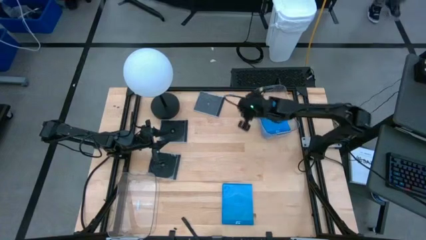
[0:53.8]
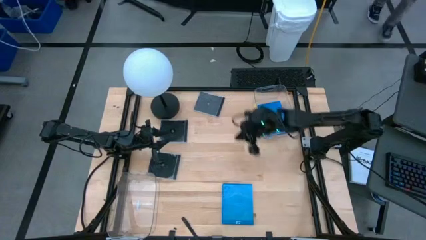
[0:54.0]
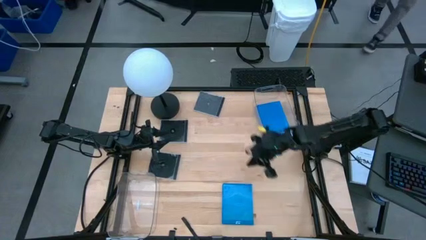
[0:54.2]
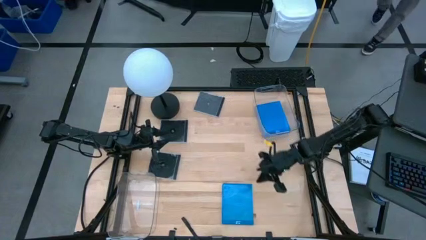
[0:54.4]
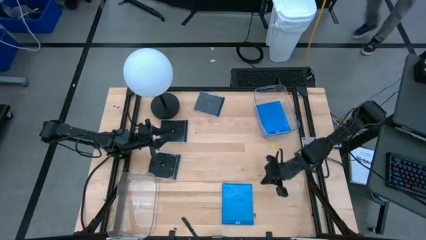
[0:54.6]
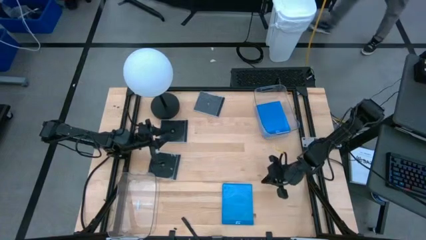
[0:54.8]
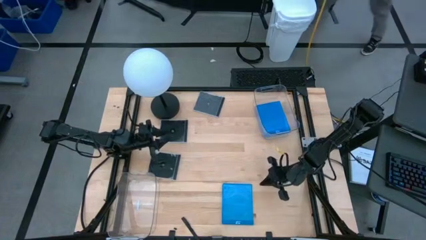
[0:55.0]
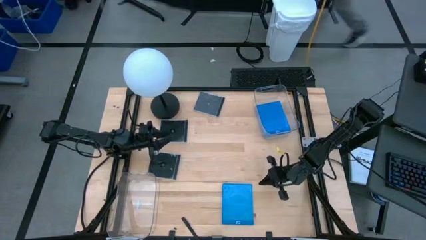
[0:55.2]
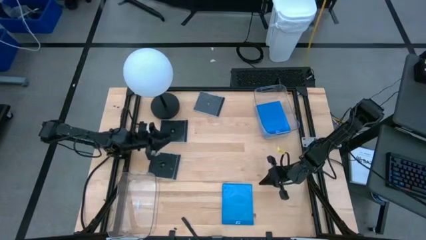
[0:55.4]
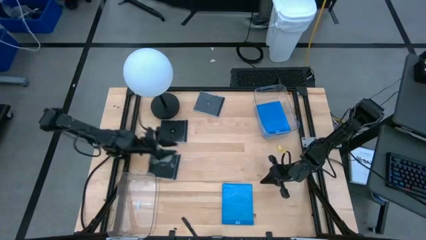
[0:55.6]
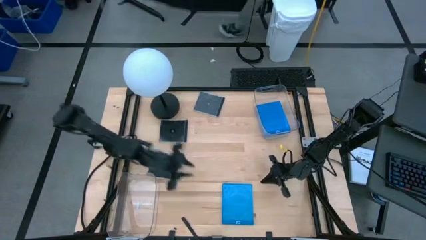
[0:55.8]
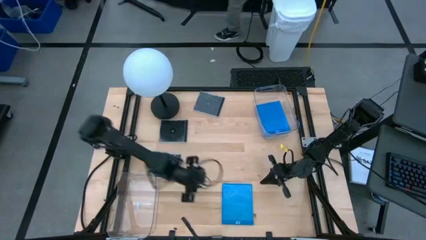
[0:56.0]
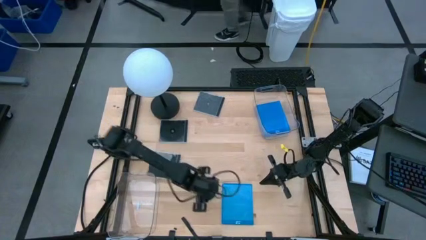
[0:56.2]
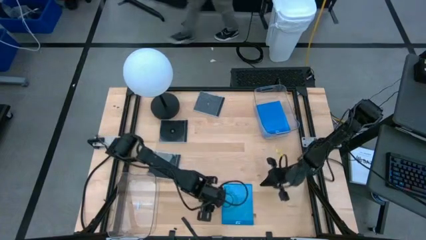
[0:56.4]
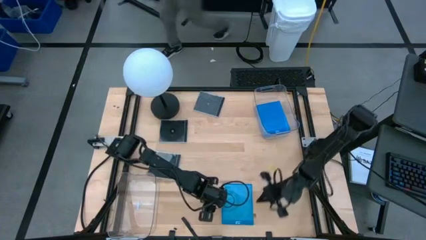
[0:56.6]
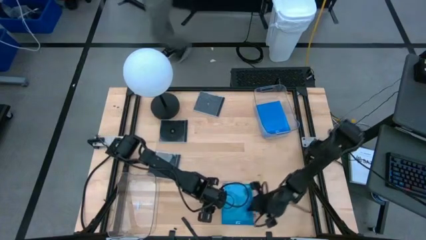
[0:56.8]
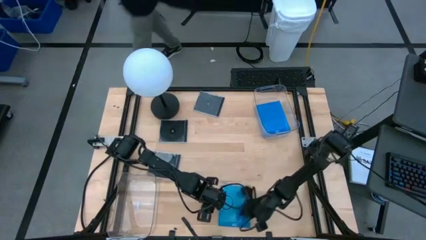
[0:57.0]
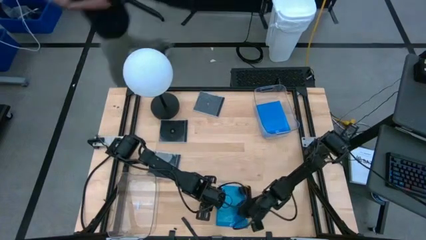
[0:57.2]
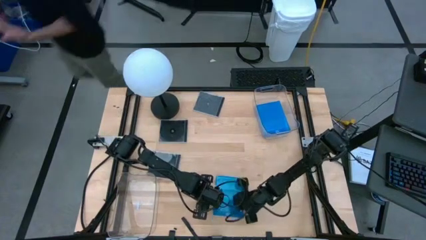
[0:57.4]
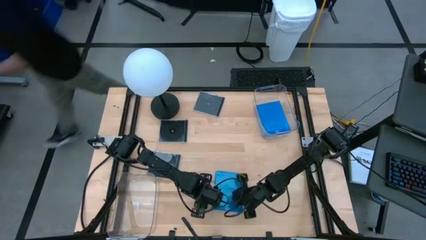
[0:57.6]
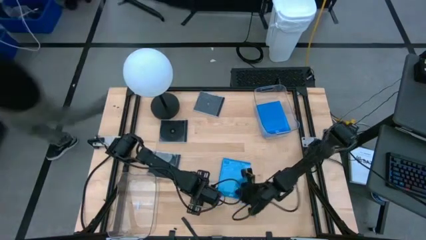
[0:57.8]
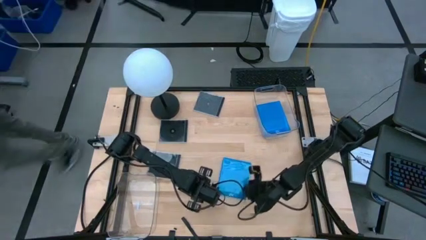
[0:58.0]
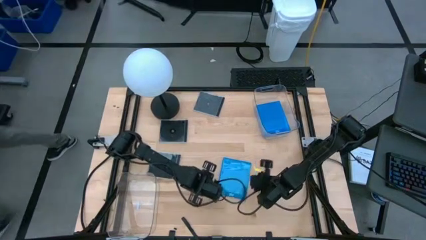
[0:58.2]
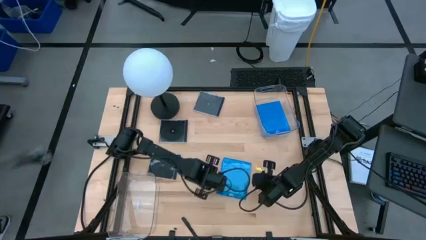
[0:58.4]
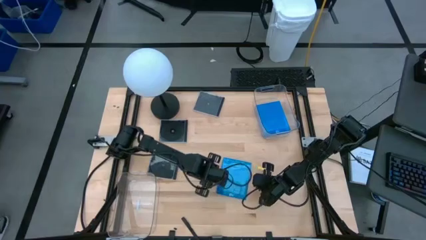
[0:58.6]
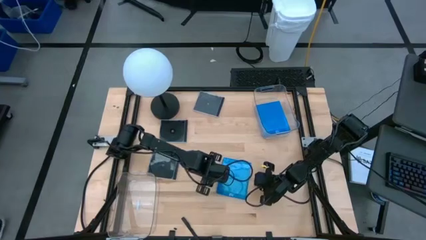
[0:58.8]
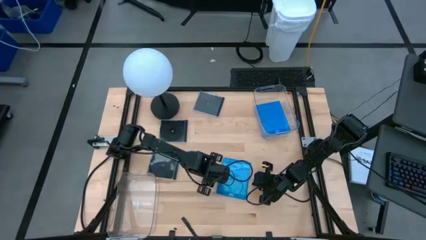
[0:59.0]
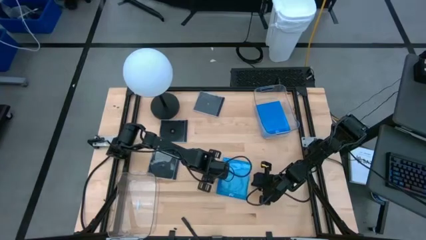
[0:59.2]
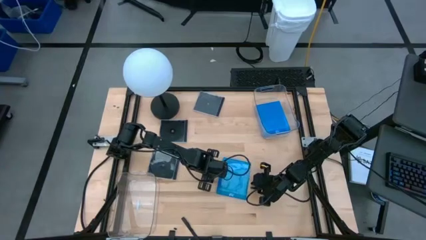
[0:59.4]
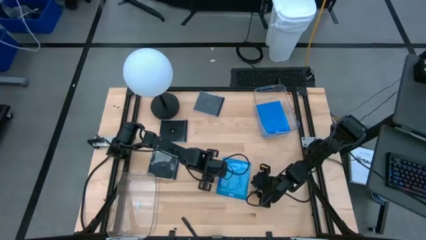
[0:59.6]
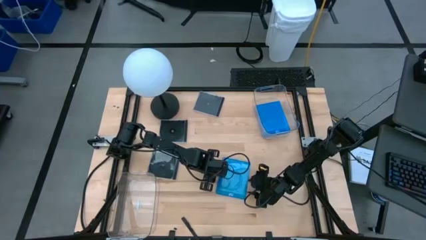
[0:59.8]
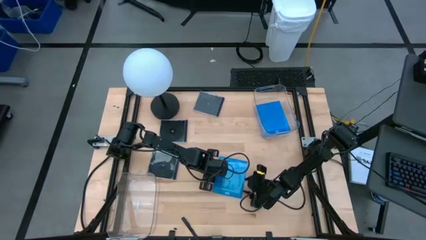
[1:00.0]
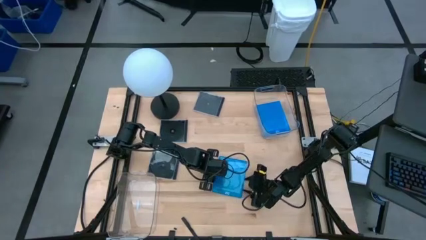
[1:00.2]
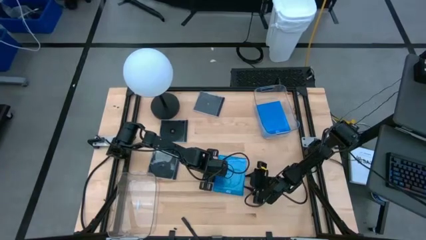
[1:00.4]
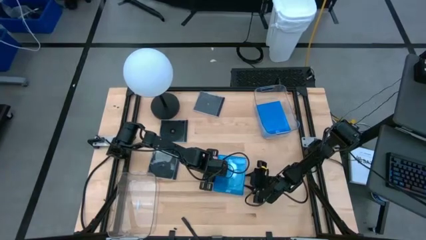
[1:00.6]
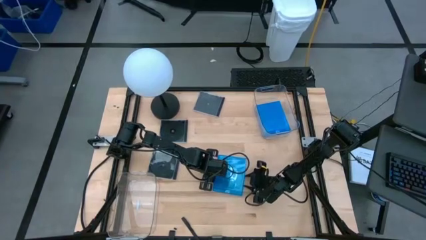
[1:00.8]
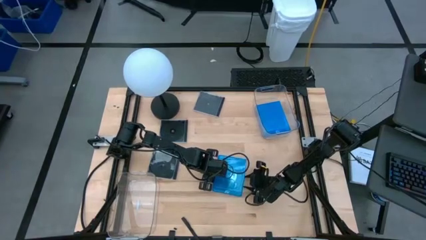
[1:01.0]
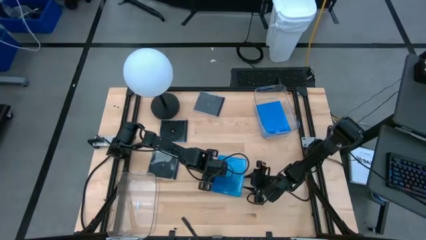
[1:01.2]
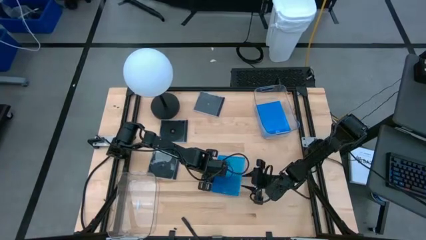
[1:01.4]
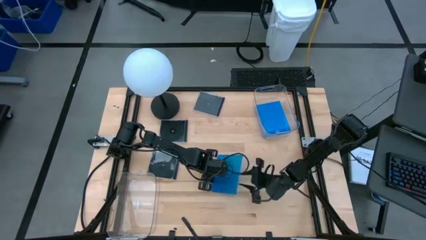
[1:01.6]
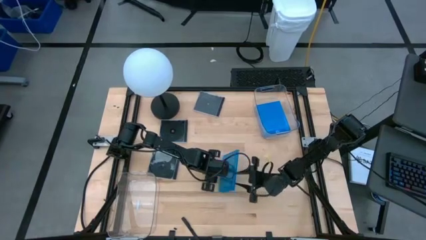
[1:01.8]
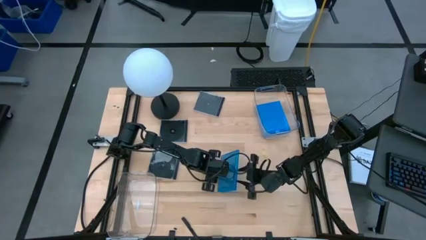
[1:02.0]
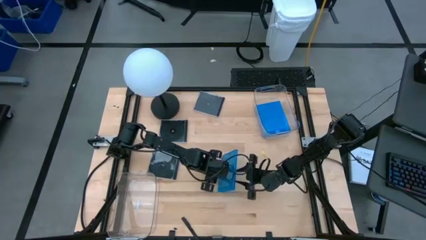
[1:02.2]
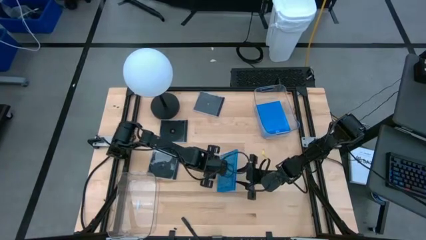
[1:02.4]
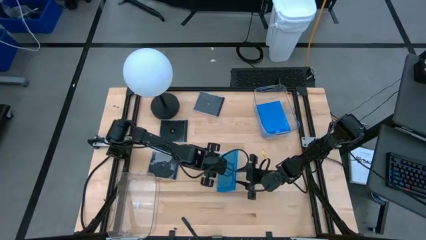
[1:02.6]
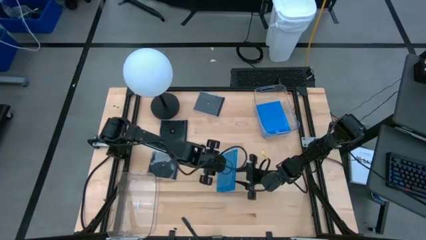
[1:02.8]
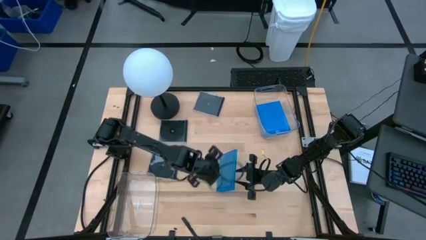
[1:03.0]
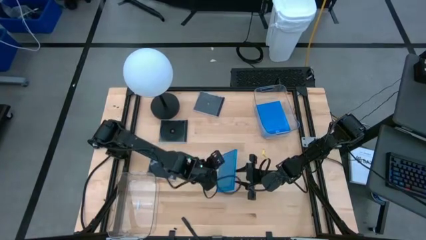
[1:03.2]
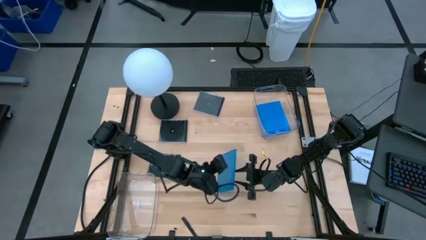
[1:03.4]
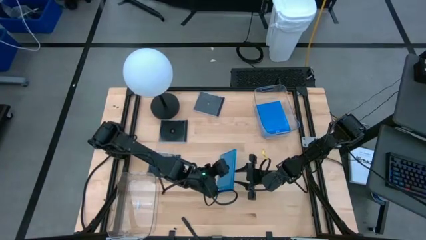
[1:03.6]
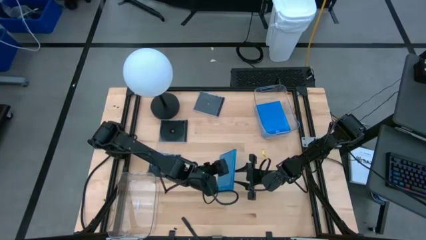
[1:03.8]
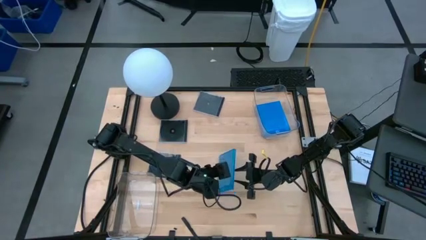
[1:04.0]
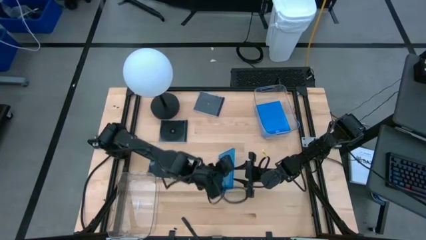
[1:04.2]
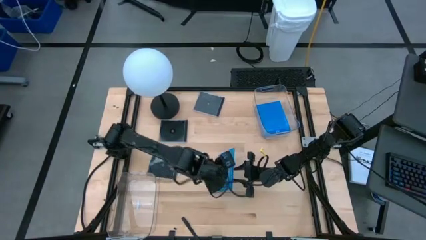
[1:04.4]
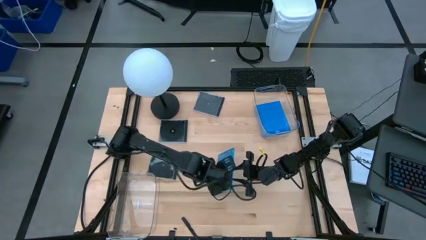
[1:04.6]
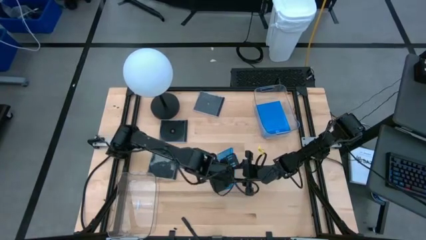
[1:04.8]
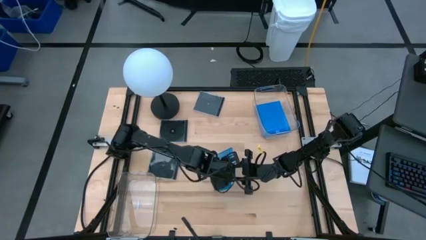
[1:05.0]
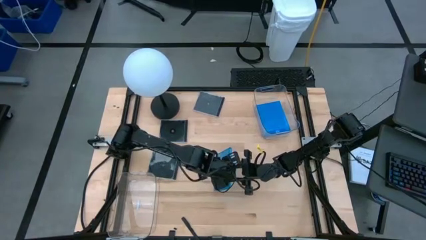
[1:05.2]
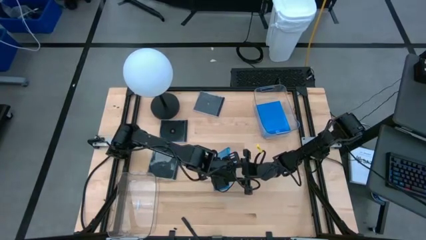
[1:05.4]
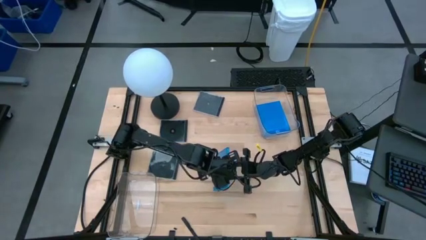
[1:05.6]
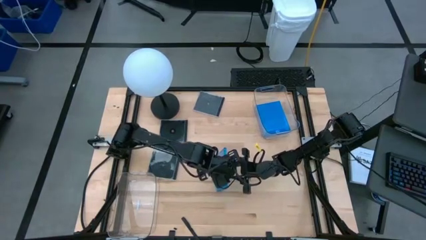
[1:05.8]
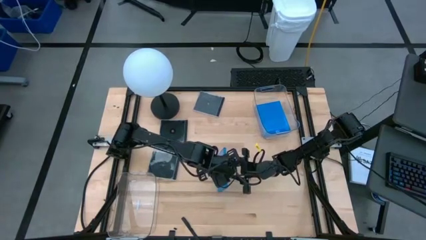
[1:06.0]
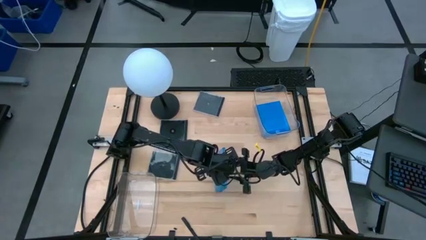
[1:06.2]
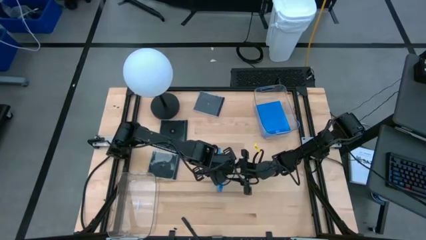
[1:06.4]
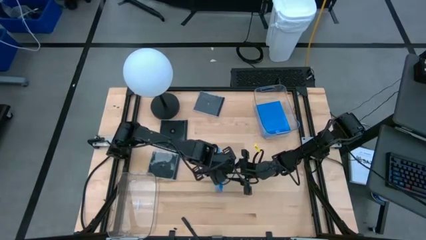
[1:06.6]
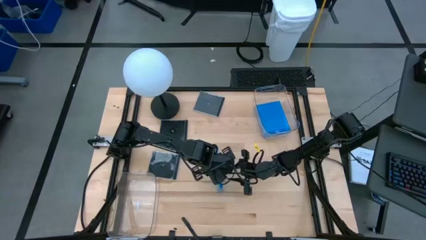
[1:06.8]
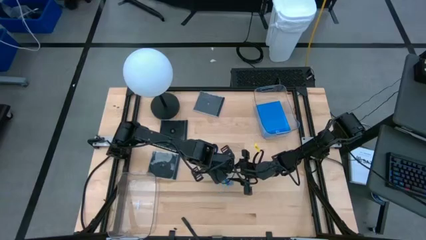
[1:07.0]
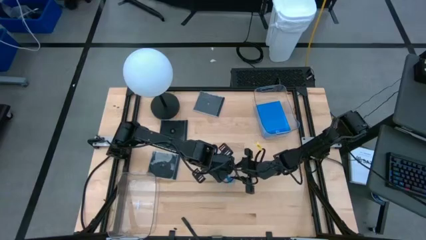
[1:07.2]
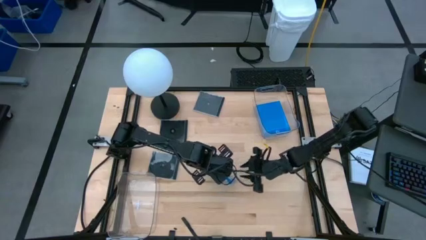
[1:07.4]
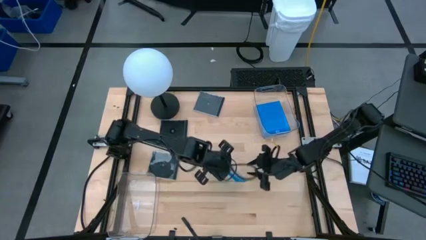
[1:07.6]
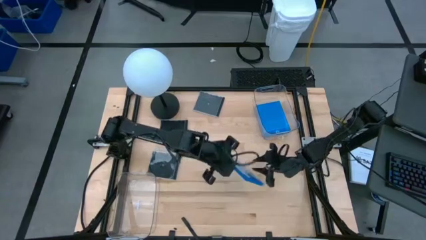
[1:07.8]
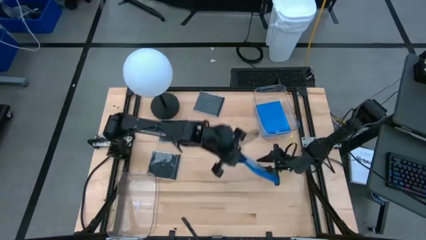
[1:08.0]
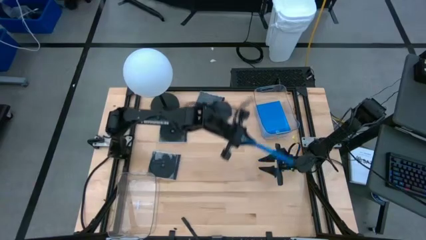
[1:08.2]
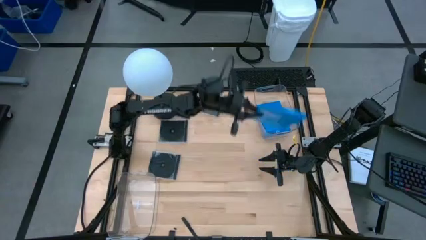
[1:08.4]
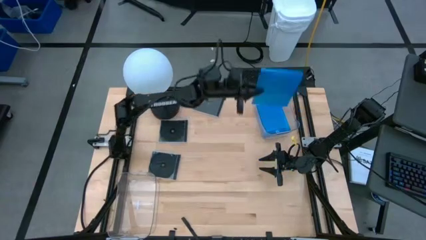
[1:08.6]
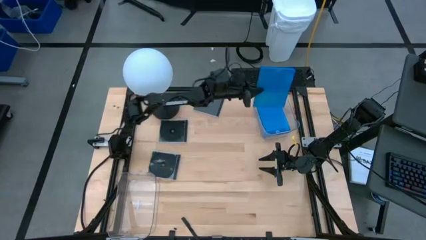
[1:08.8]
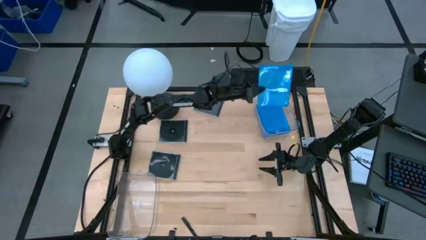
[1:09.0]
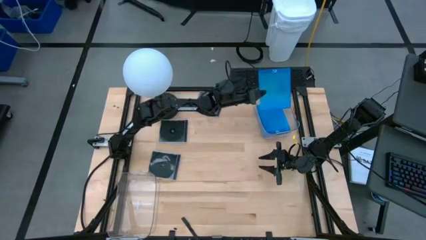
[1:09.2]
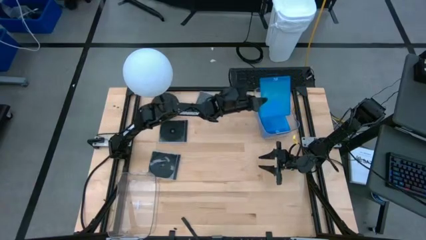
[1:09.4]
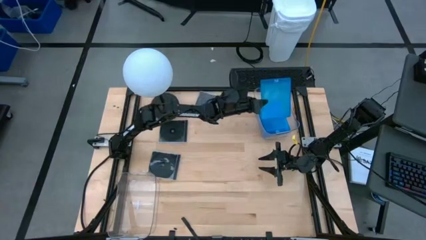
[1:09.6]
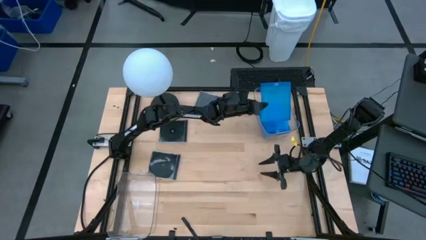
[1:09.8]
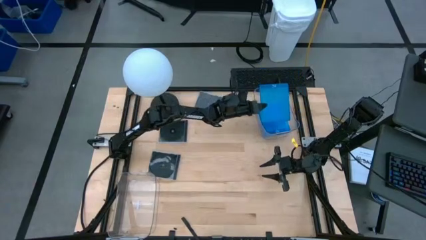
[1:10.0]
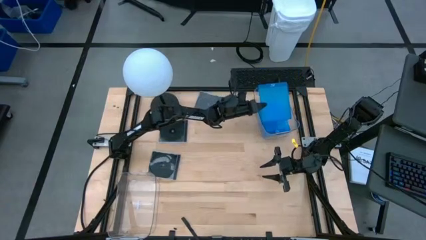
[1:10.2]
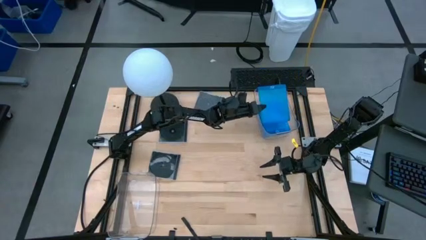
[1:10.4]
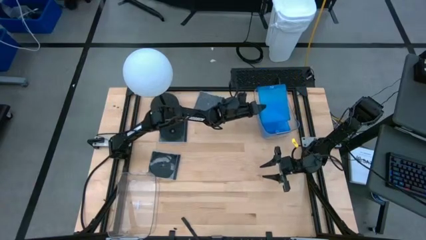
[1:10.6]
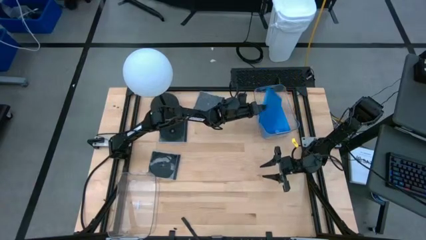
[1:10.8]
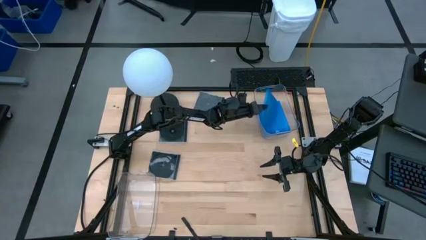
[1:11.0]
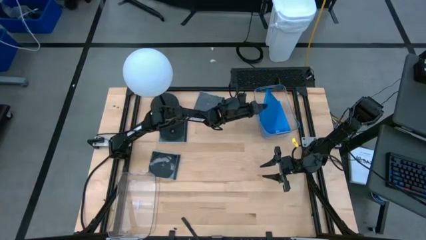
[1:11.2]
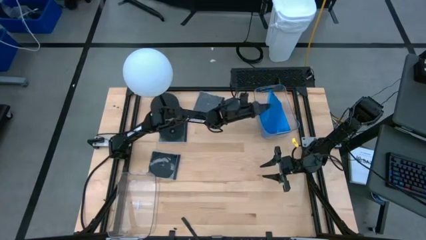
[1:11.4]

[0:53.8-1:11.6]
Task: Pick & place jewel cases by type
Put the blue CD case into the top transparent bin
